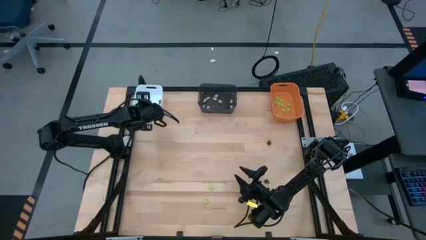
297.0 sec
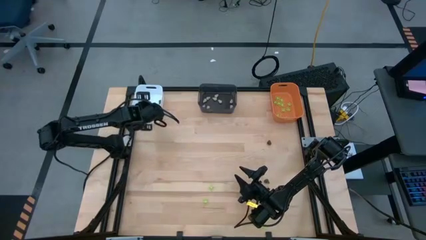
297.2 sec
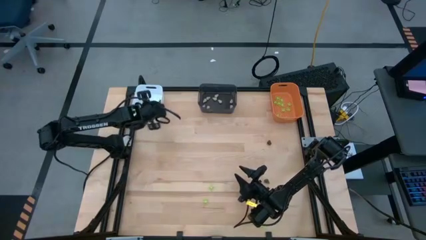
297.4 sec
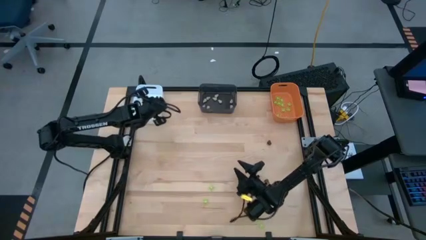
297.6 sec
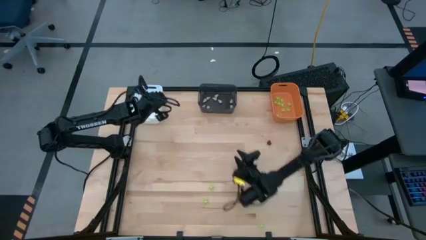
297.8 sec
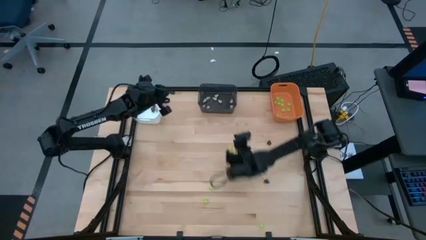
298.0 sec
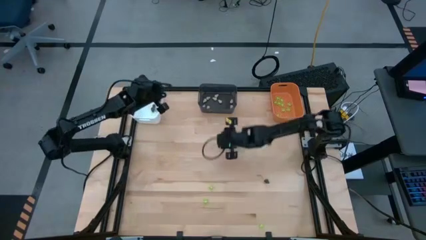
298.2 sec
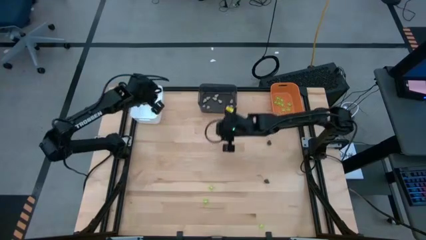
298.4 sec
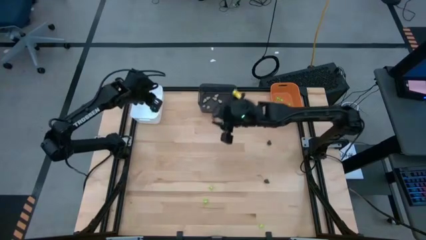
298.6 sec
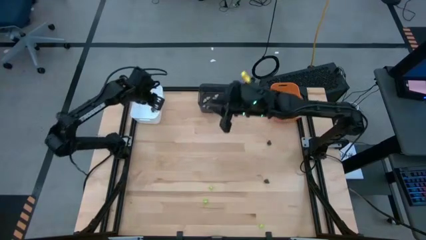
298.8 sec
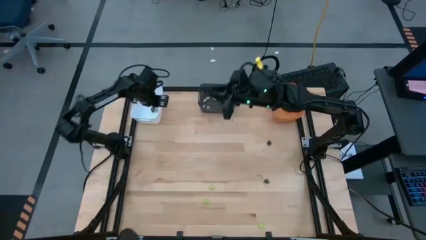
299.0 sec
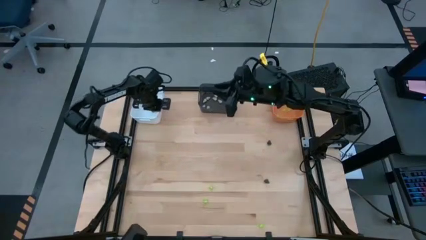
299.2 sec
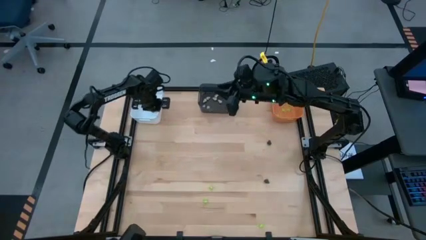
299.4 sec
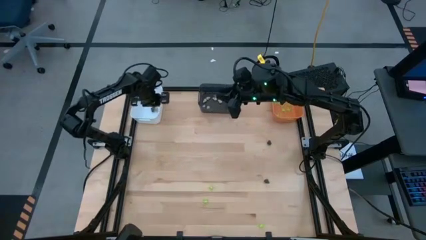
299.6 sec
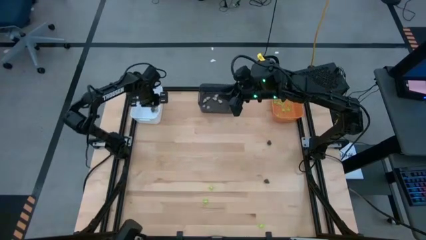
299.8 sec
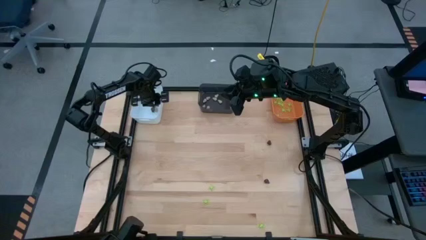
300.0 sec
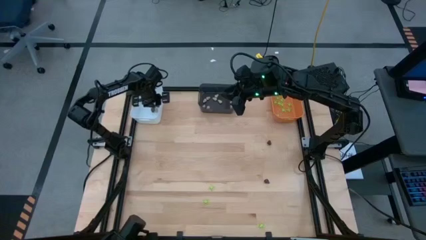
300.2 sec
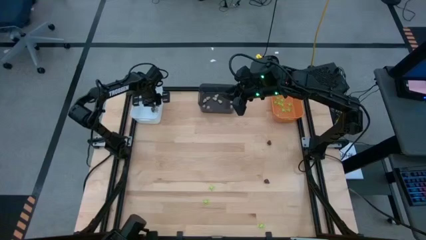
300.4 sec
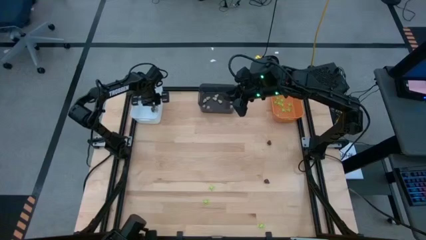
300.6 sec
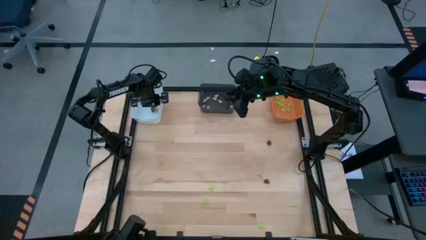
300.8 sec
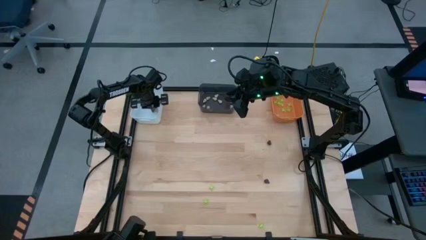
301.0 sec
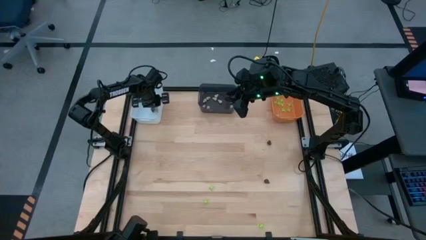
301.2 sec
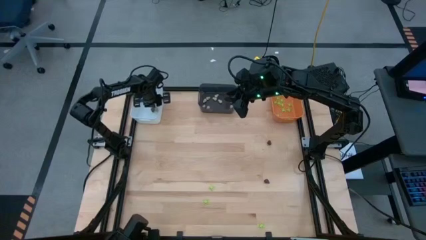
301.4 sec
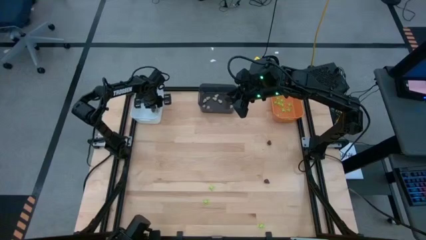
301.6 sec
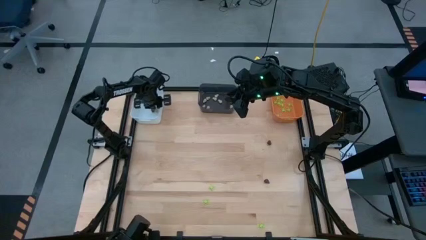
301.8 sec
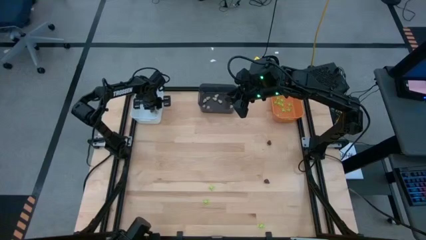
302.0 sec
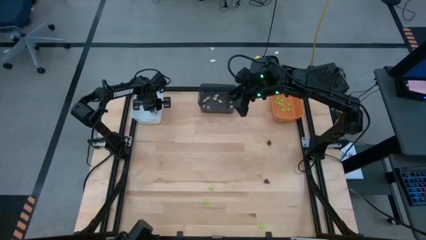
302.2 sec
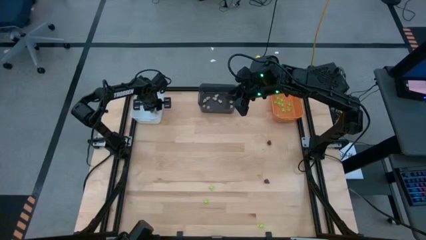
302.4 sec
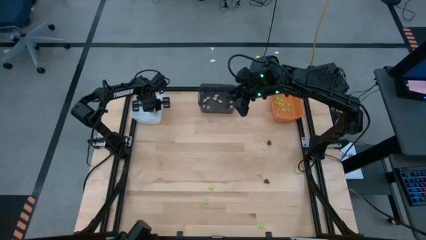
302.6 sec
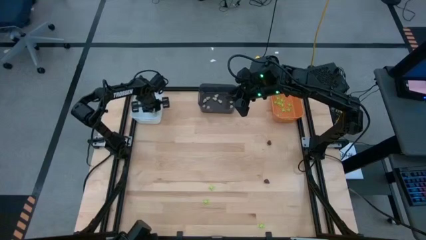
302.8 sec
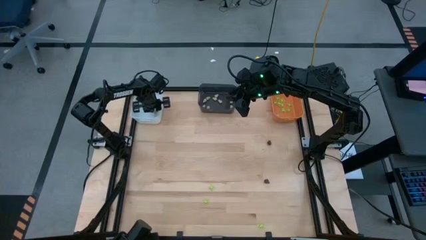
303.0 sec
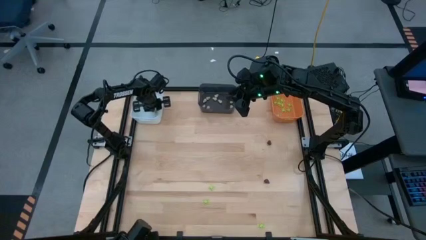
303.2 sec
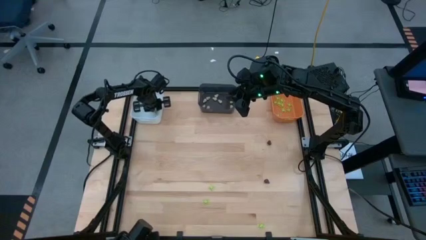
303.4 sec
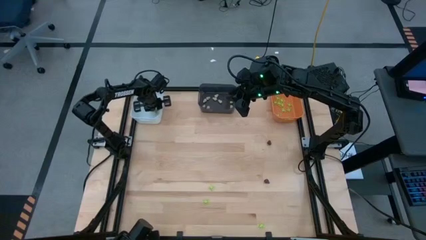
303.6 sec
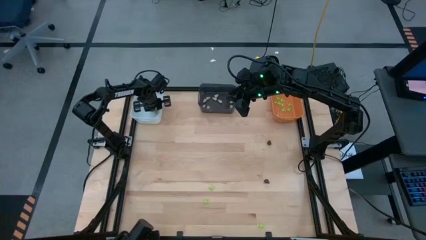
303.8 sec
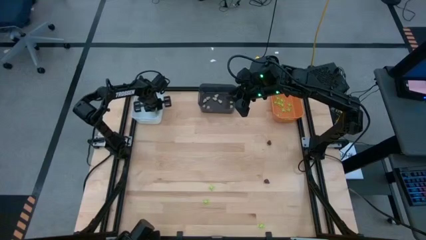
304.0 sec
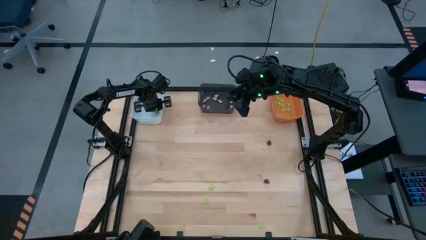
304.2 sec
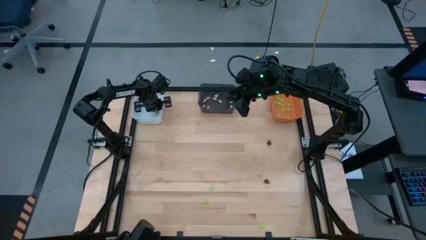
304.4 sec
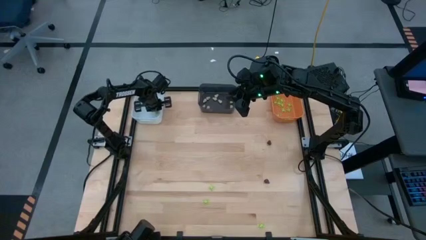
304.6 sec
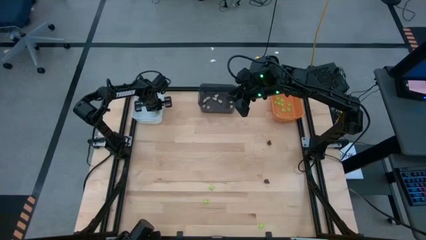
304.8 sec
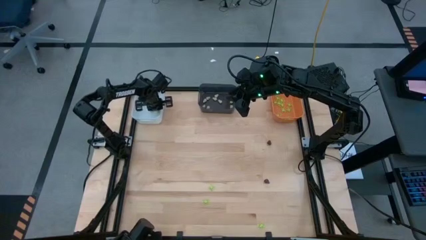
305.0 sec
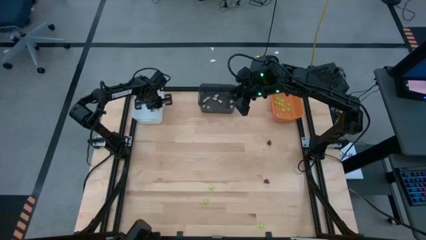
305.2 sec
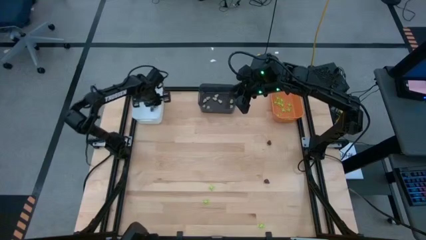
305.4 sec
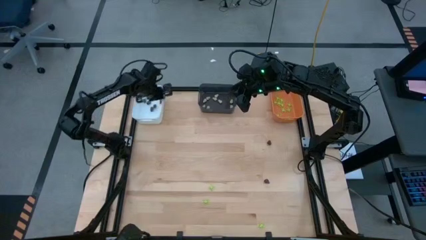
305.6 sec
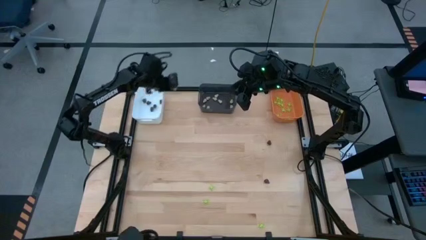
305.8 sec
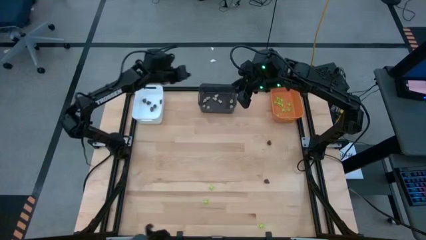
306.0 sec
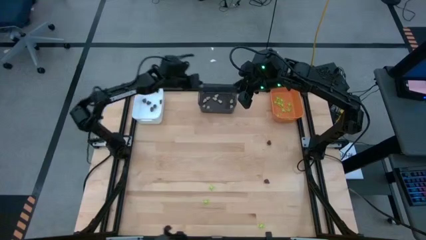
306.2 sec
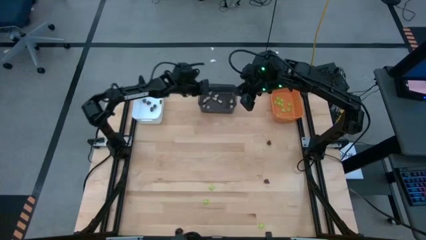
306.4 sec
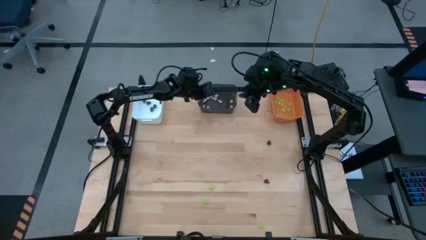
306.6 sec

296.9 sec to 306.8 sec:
Task: Sort Halloween decoration
Put the white toy skull into the black bin

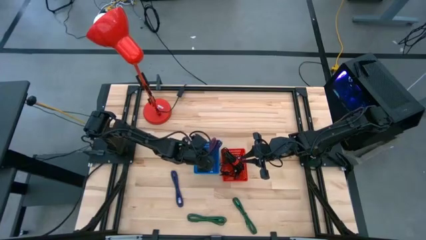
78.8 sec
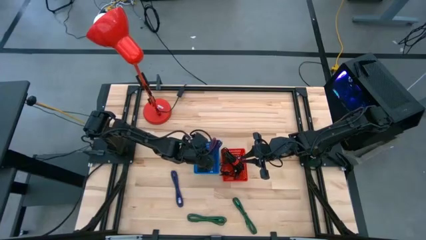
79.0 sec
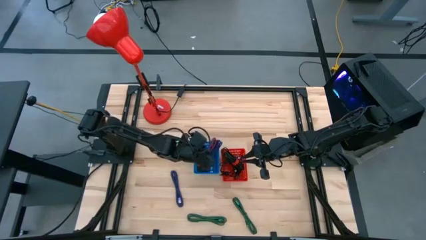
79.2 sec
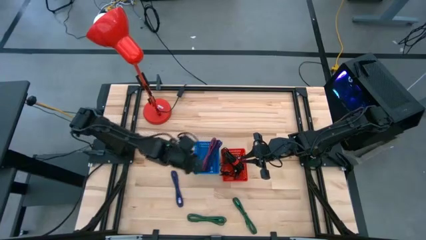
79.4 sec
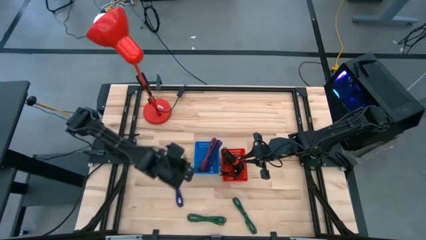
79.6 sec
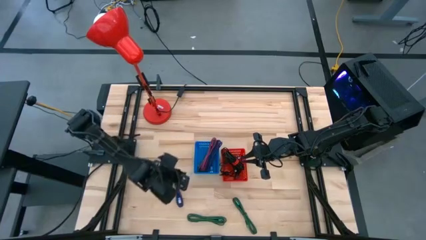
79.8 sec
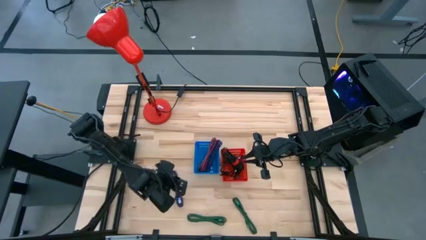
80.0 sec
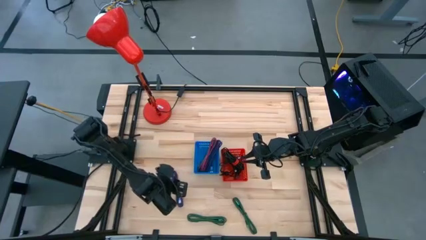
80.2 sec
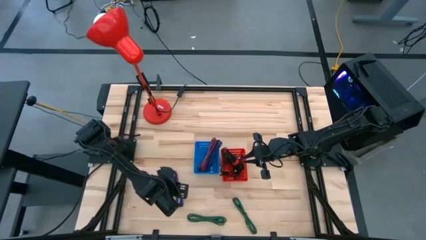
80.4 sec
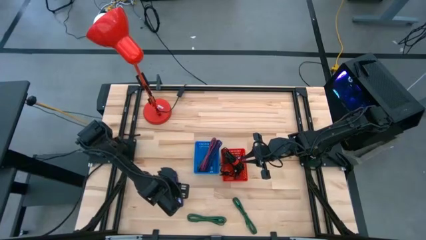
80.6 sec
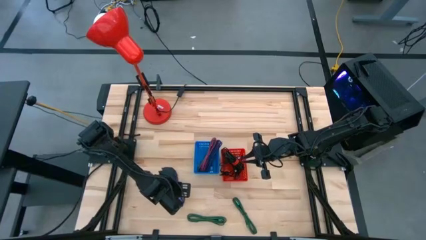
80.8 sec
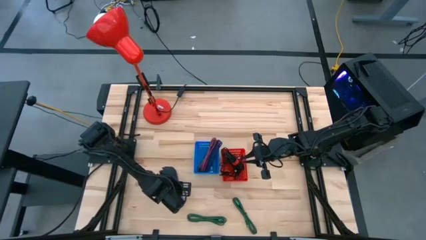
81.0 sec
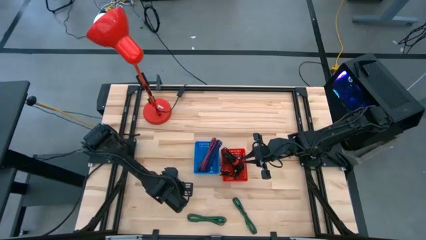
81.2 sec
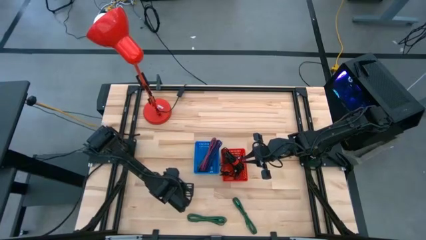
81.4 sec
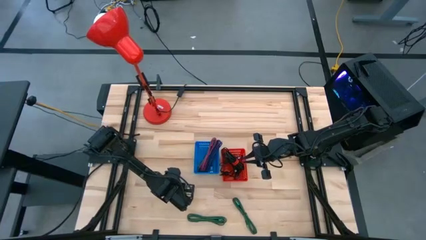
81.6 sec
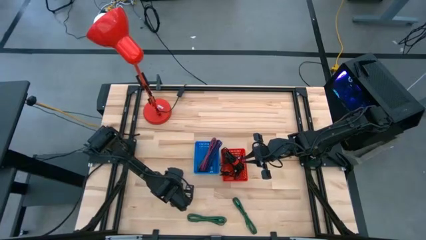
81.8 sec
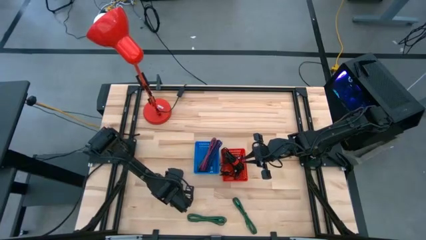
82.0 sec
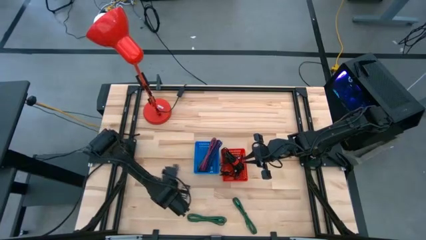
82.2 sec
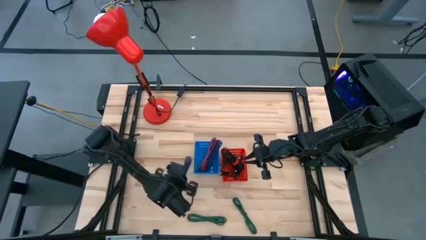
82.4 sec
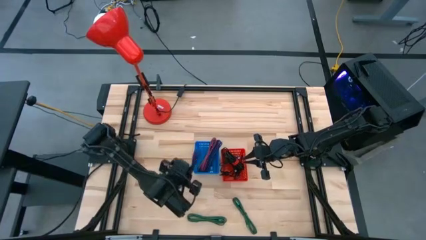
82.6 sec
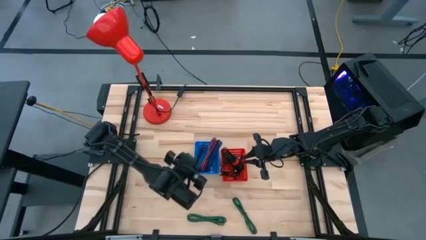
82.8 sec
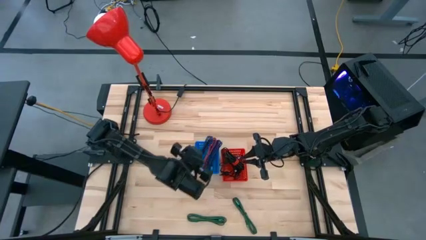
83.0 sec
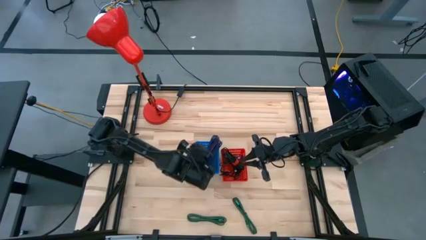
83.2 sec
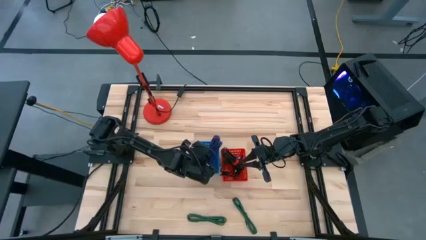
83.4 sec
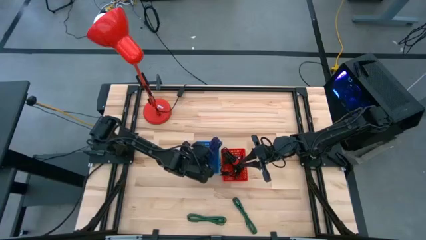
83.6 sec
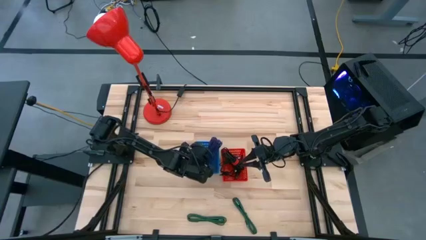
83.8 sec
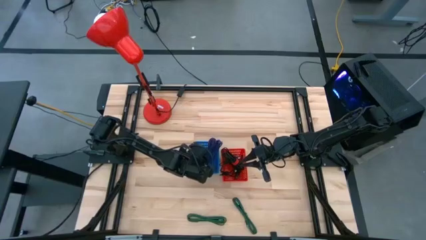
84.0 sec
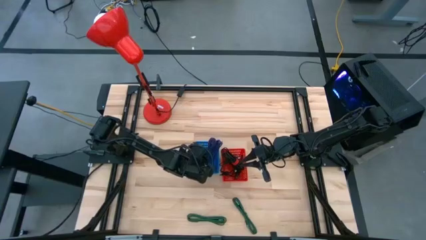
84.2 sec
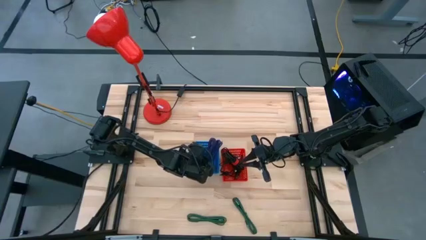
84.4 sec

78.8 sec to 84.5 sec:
Task: Pick & Place USB Port
Put the purple charger cable into the blue bin
